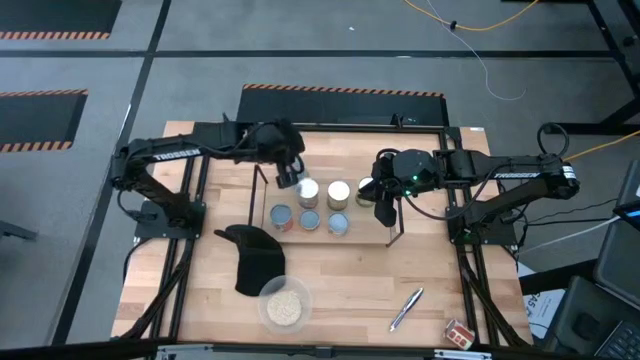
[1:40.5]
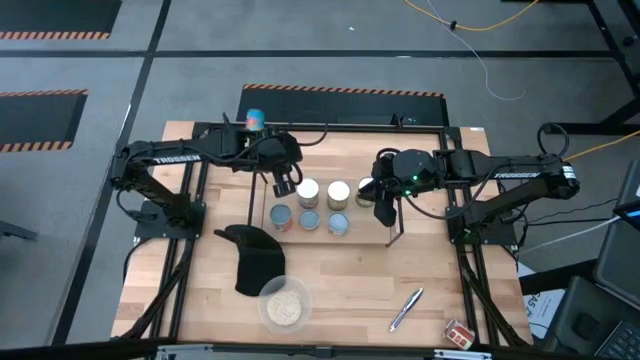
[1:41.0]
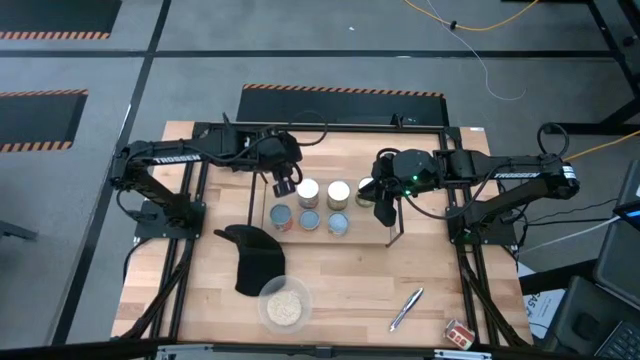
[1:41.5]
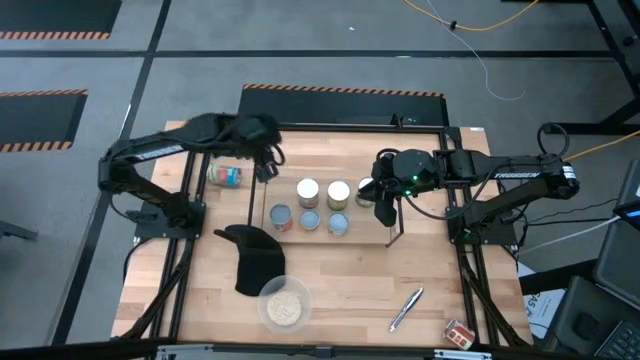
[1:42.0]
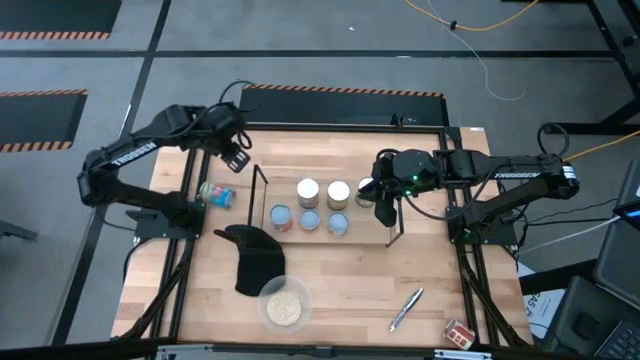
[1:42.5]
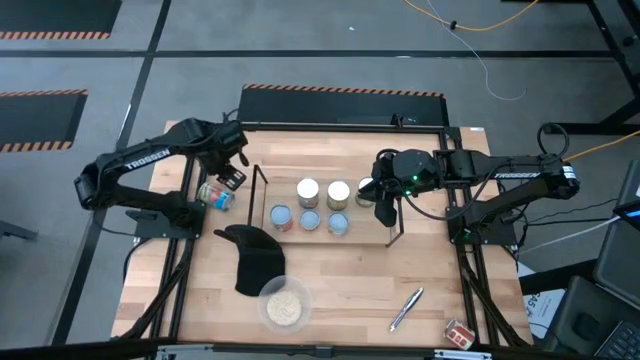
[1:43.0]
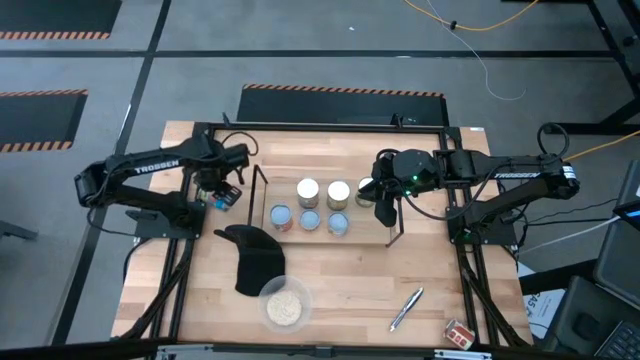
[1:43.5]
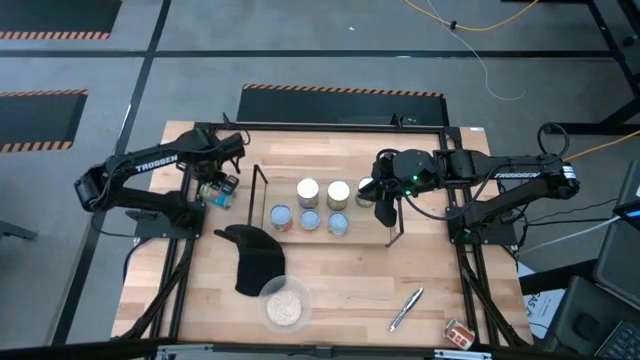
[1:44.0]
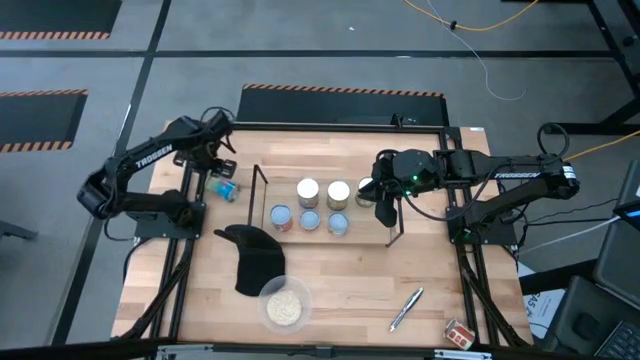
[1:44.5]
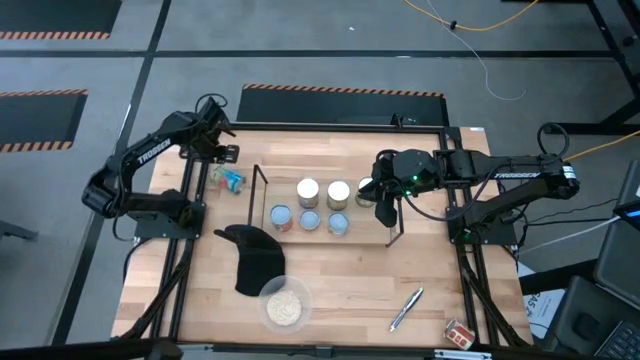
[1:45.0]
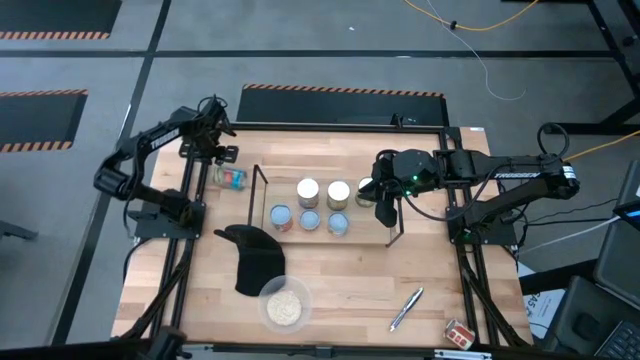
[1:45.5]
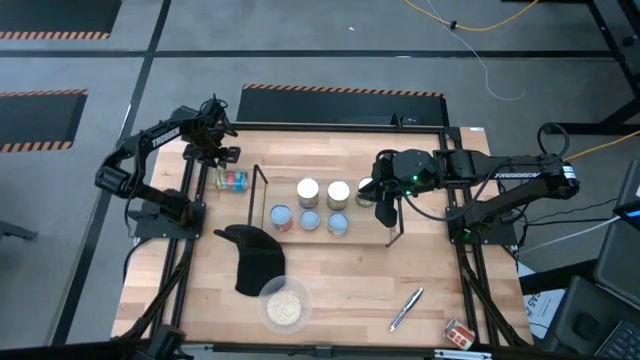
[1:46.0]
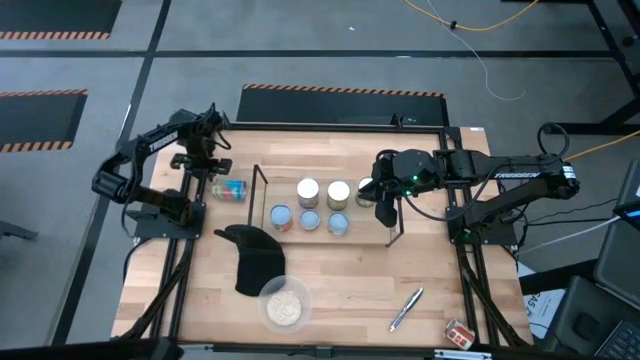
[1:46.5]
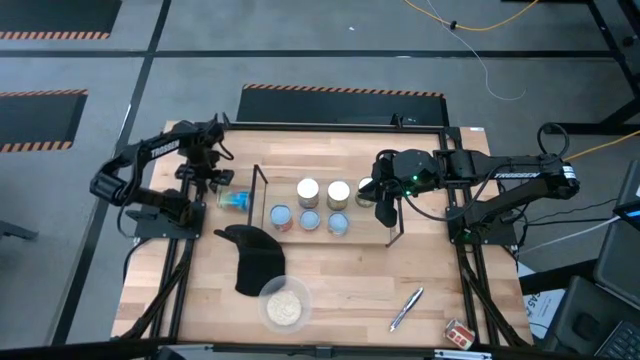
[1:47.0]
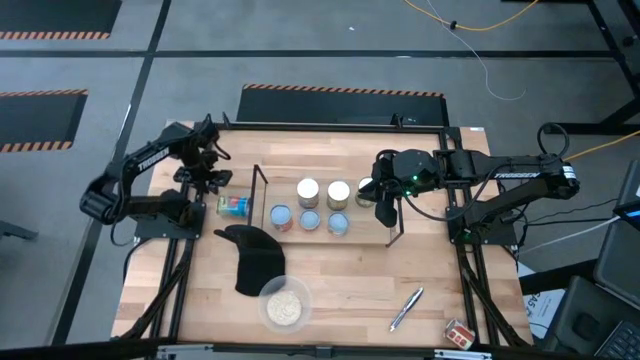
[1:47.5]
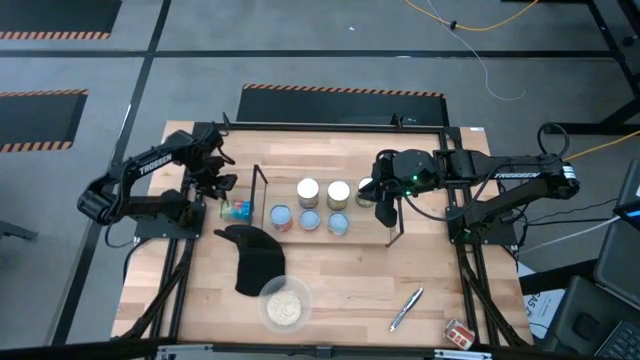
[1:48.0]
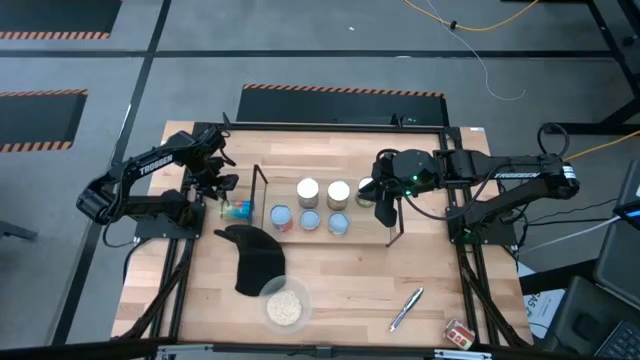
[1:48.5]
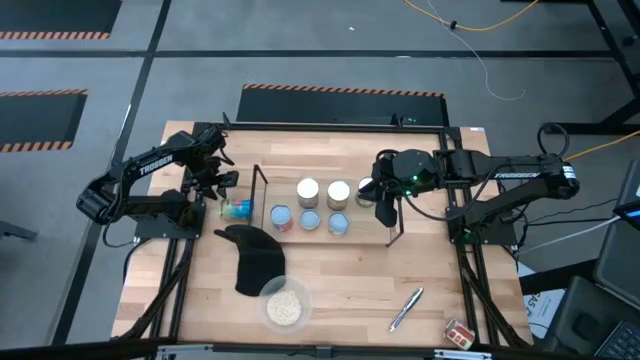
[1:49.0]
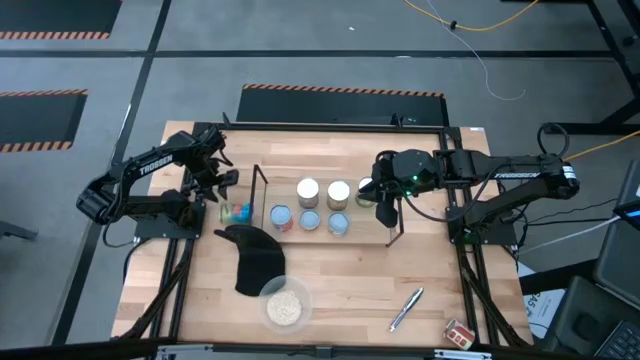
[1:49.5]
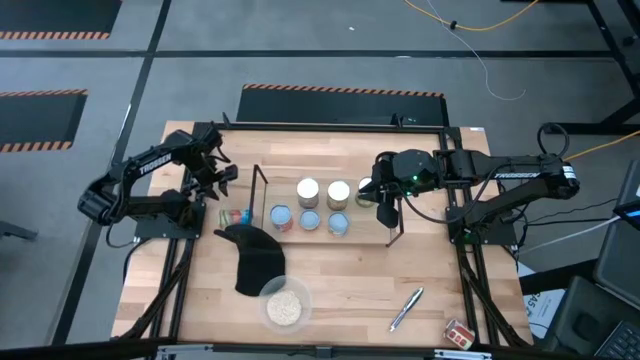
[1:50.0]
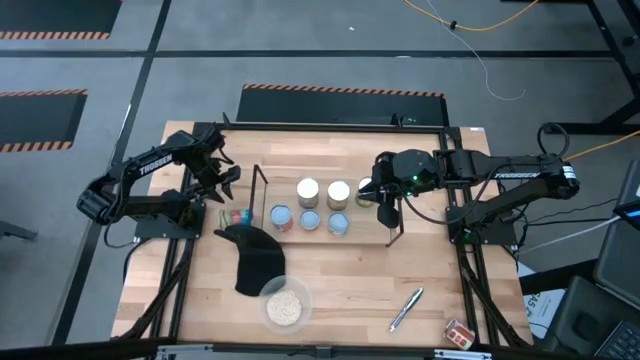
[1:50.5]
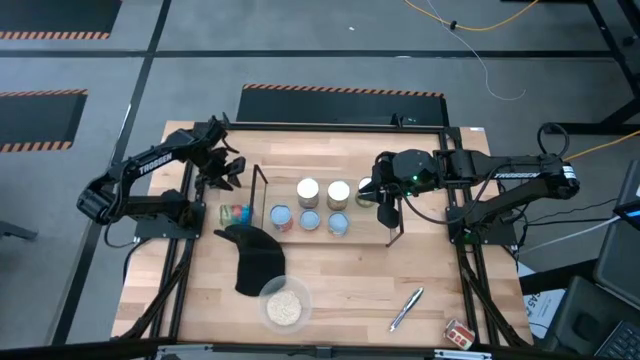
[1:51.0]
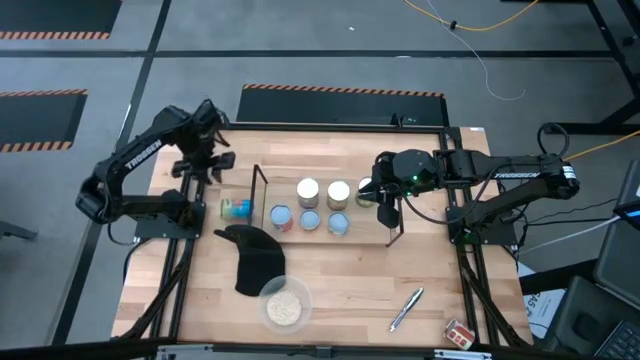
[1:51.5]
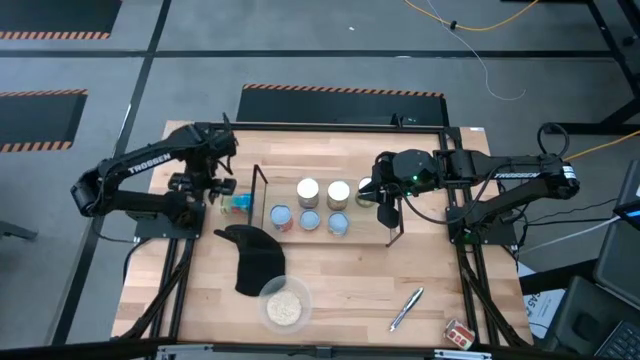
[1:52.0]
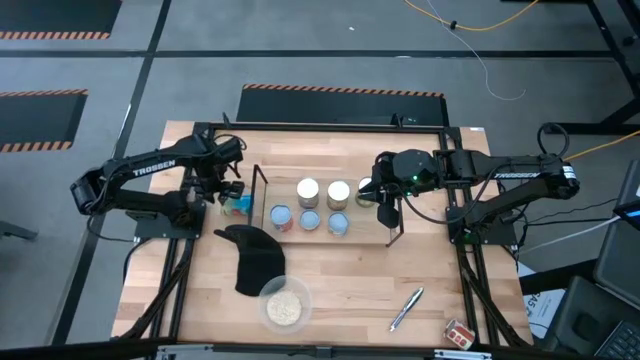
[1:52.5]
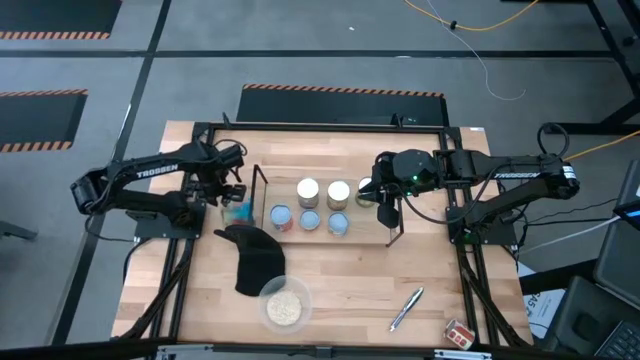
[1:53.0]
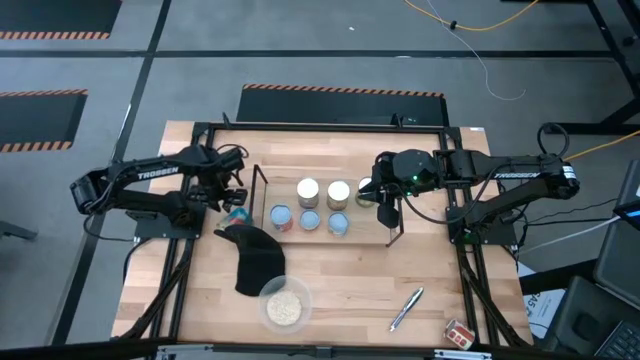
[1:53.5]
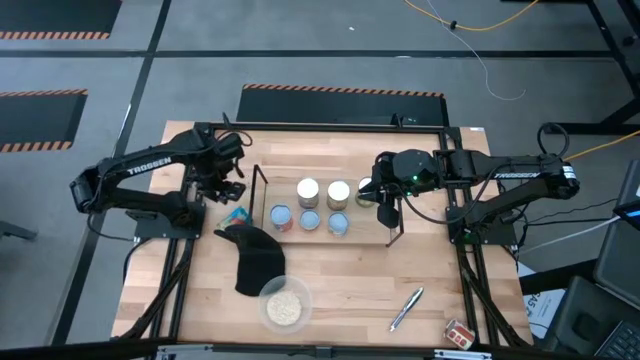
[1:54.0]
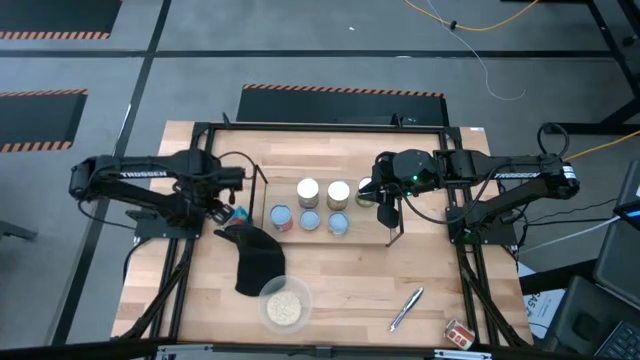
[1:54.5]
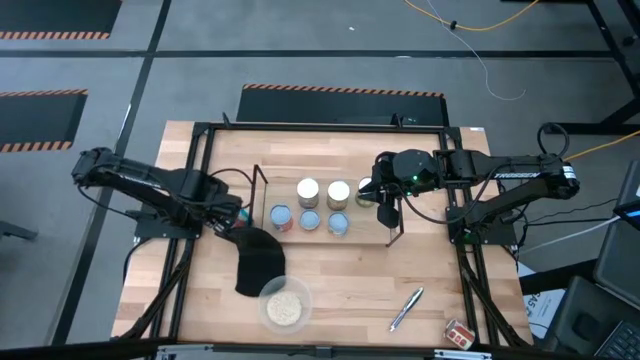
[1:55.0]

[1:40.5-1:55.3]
Task: Pick and place cans onto a shelf
Put the large canned tomatoes on the shelf

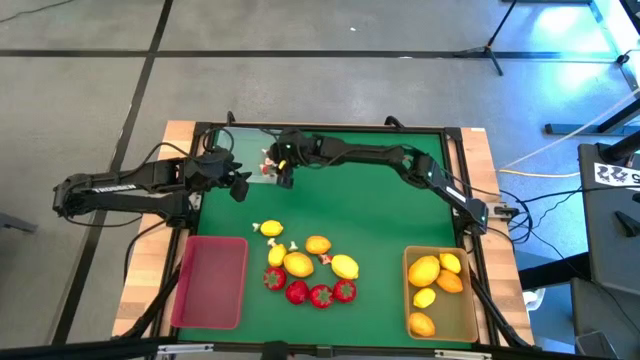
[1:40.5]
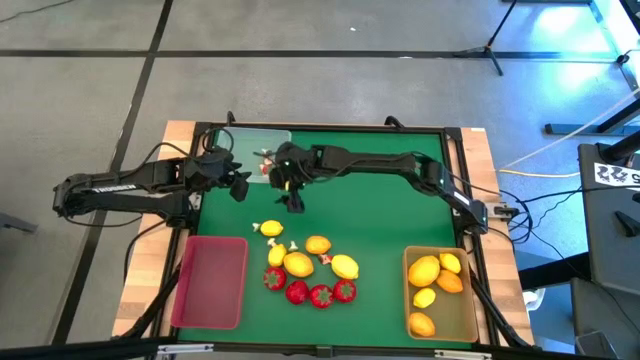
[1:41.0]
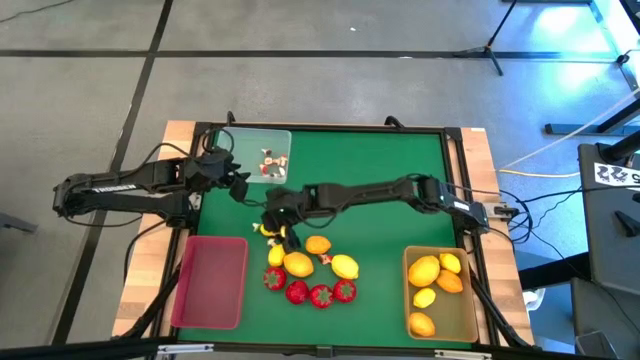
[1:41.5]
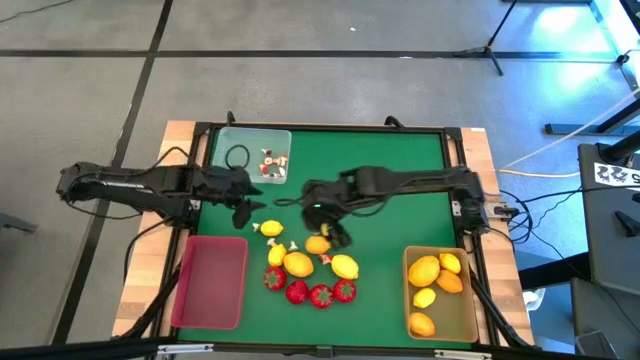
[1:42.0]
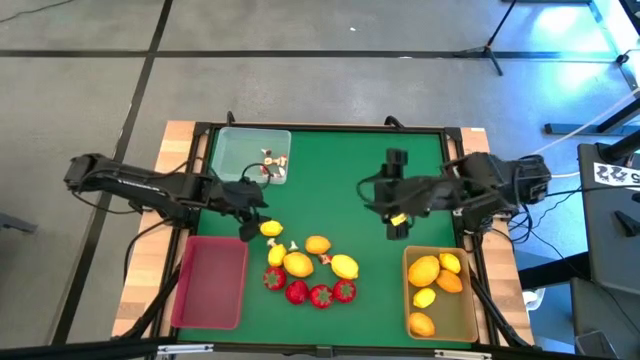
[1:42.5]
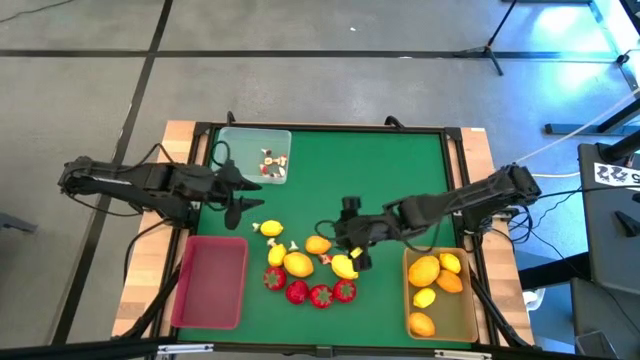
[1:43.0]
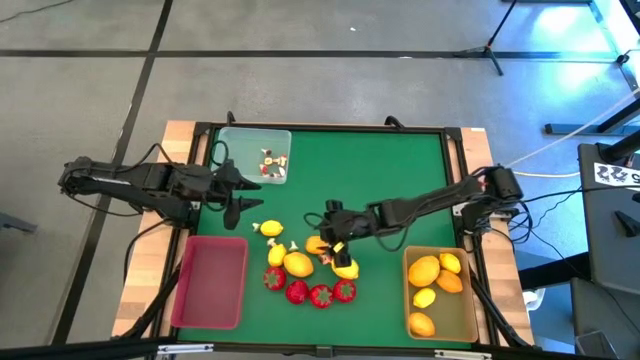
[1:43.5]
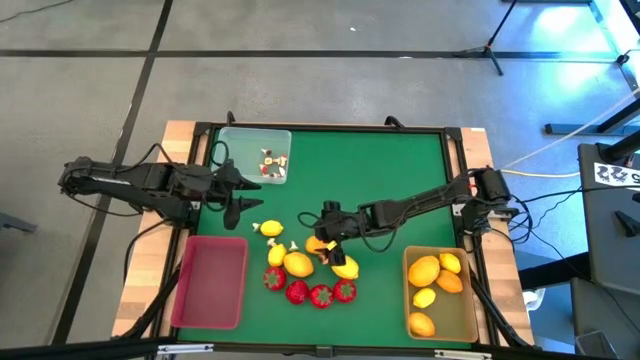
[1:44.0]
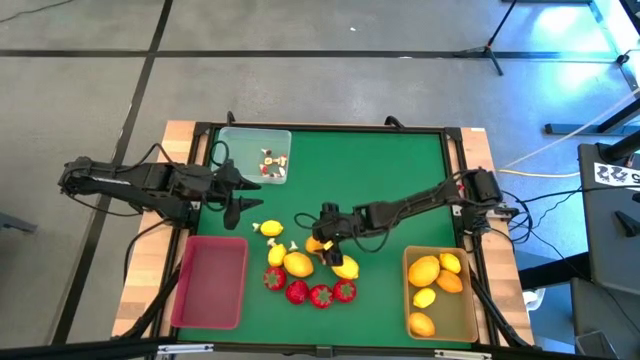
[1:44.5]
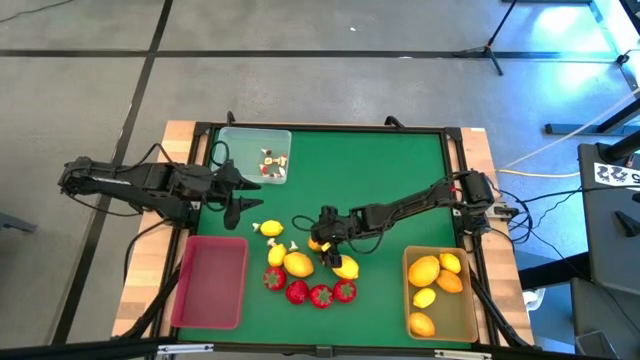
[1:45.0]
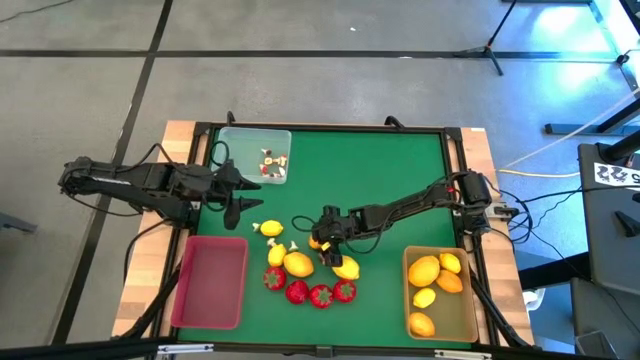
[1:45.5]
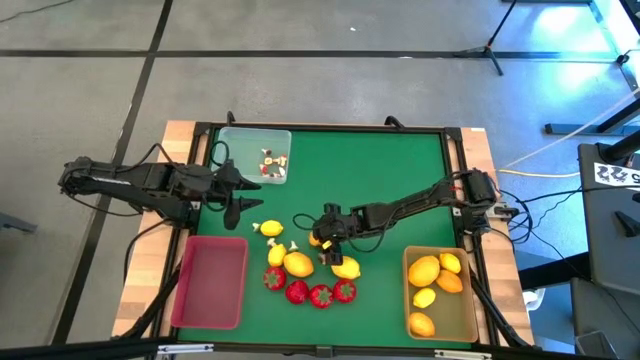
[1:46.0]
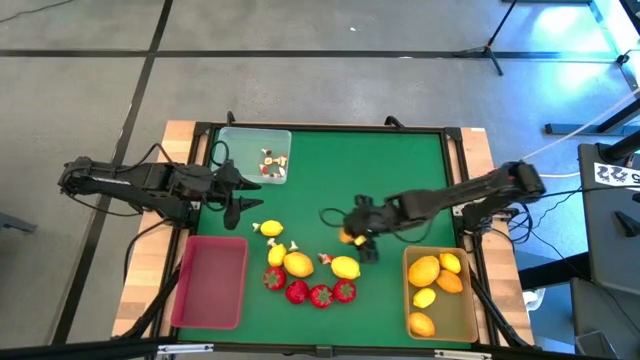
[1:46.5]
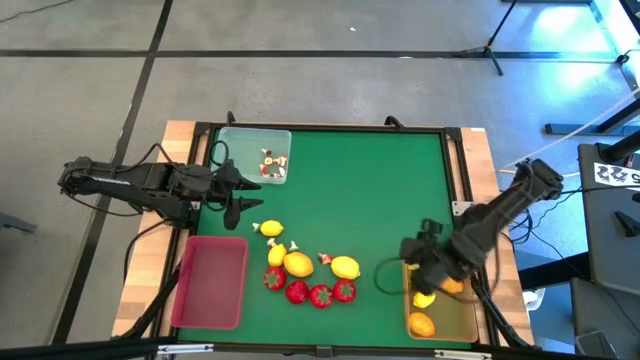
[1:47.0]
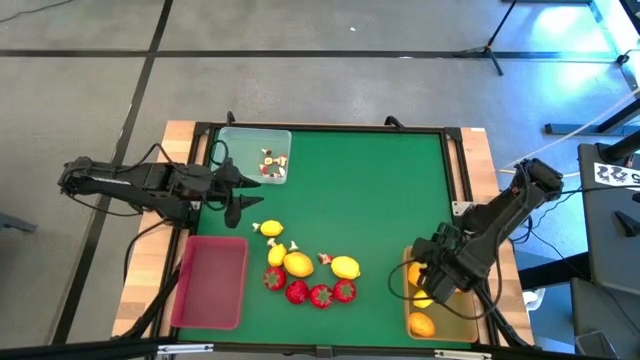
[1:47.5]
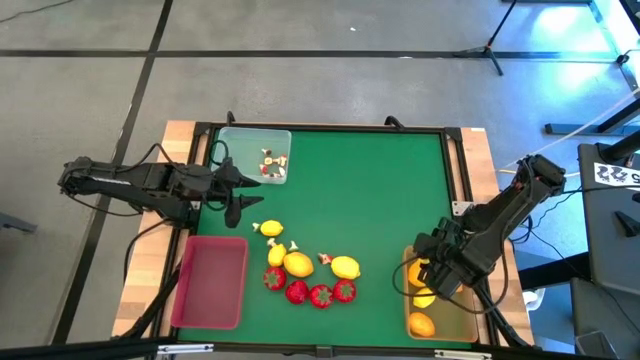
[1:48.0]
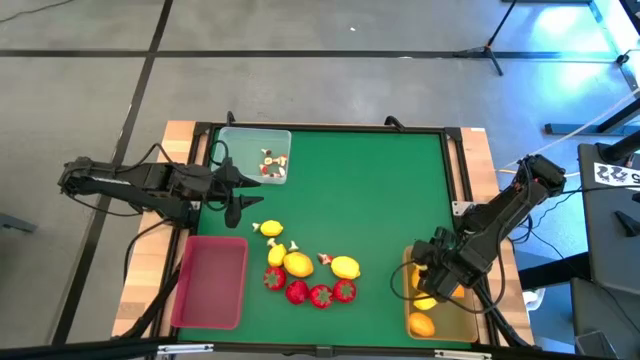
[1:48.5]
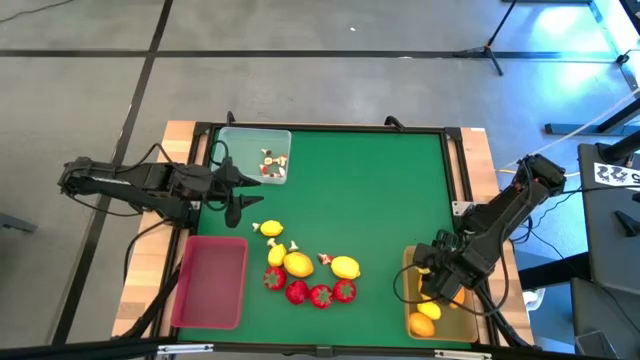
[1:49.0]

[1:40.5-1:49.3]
Task: Sort produce into baskets
Put the lemon into the orange bin
